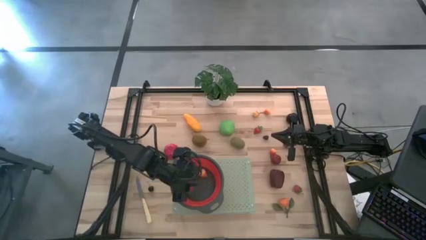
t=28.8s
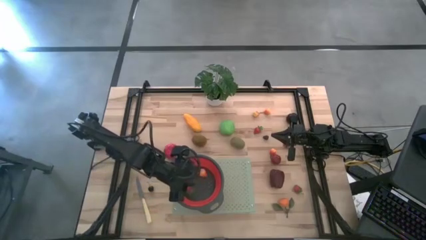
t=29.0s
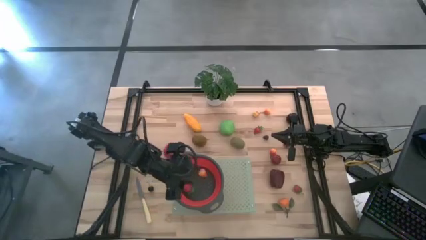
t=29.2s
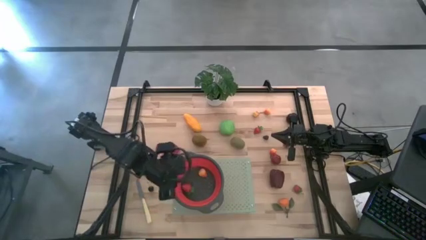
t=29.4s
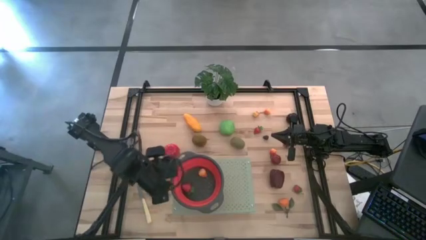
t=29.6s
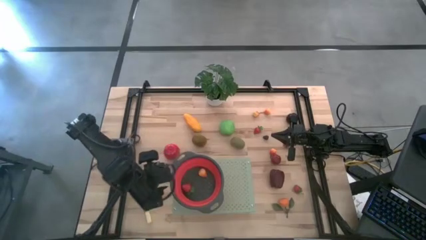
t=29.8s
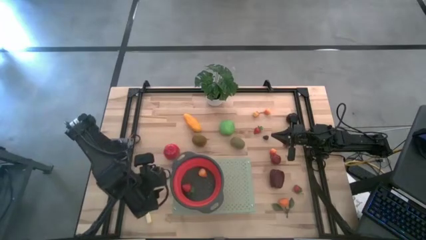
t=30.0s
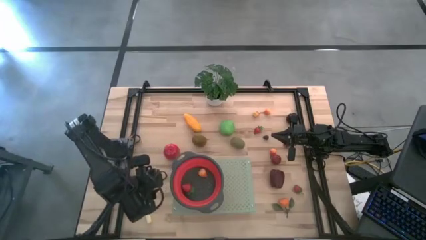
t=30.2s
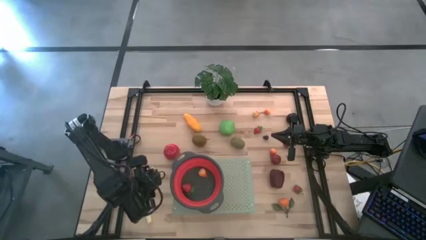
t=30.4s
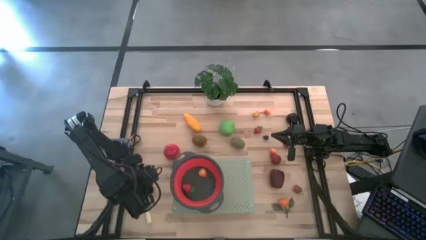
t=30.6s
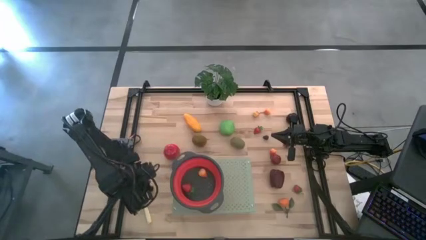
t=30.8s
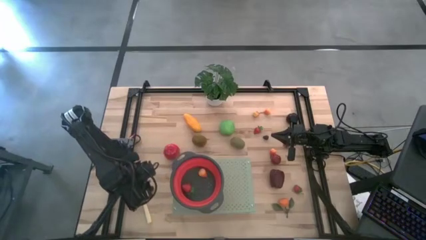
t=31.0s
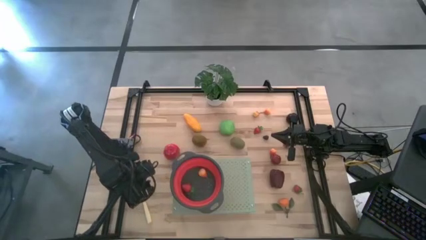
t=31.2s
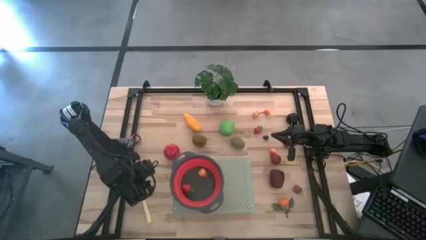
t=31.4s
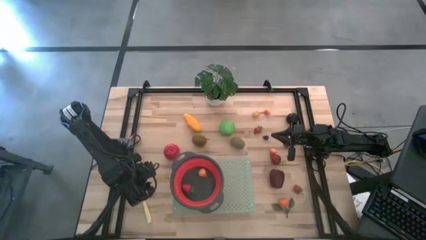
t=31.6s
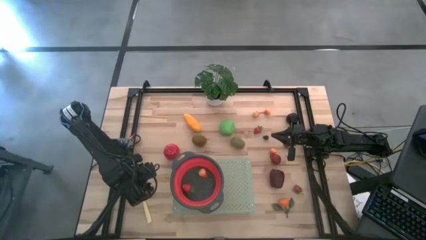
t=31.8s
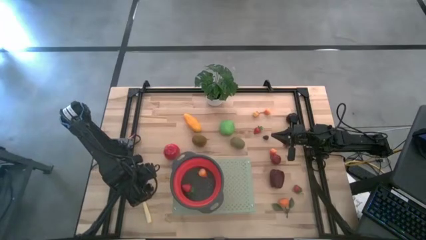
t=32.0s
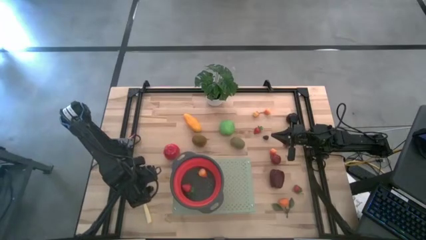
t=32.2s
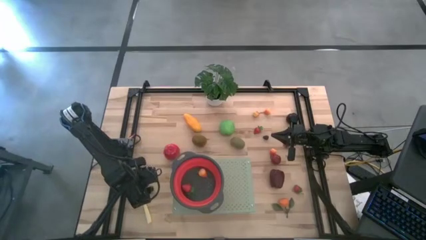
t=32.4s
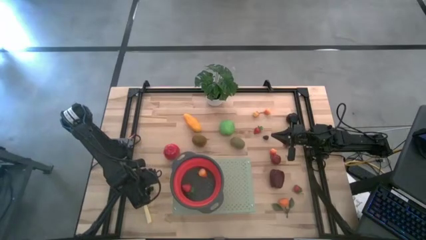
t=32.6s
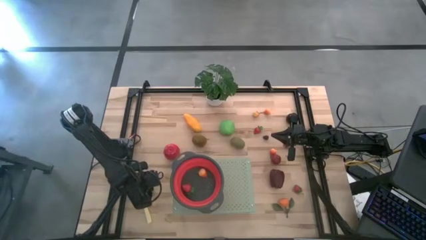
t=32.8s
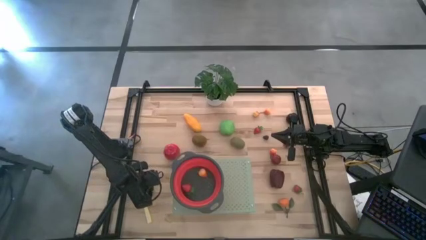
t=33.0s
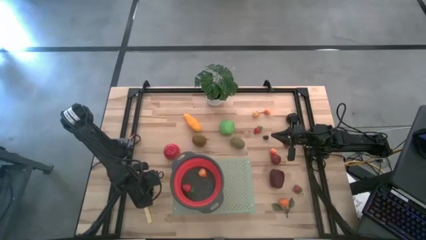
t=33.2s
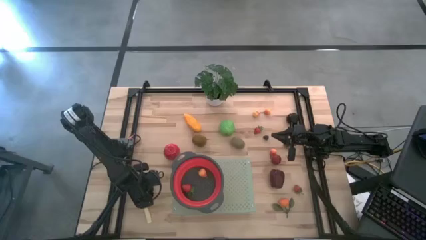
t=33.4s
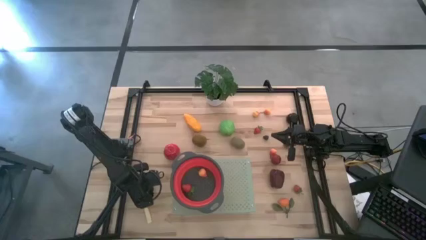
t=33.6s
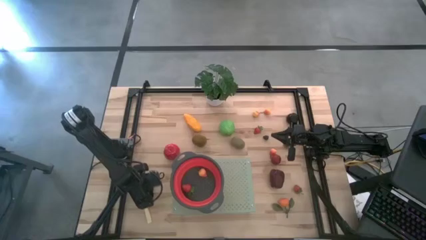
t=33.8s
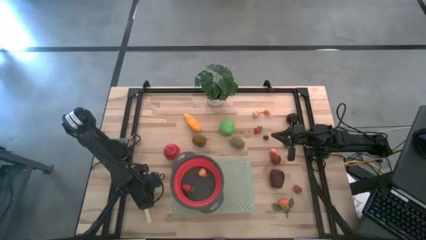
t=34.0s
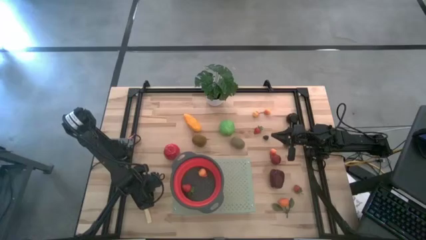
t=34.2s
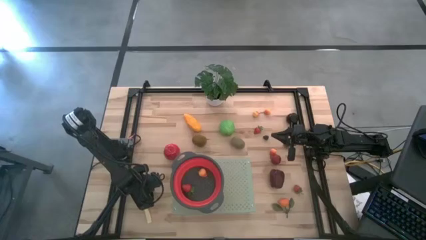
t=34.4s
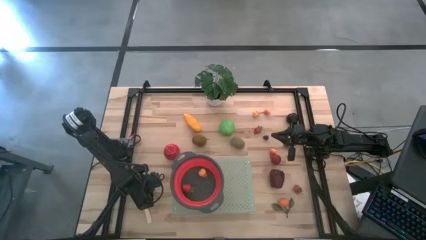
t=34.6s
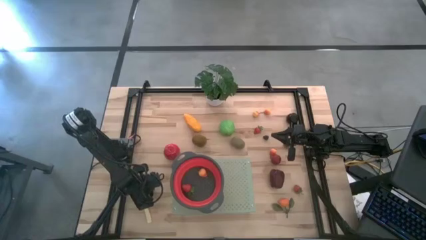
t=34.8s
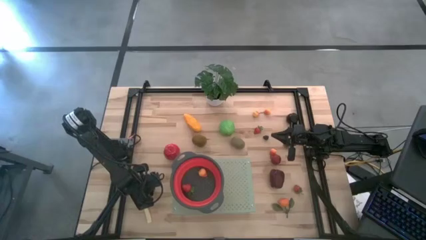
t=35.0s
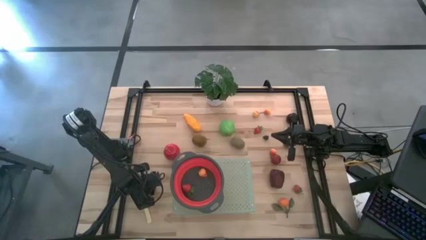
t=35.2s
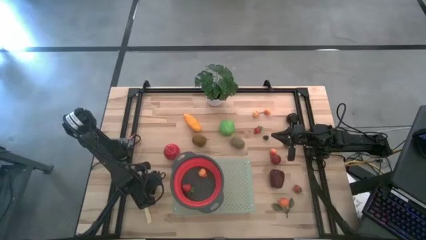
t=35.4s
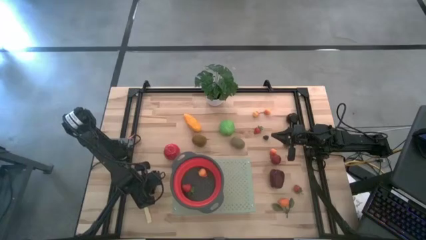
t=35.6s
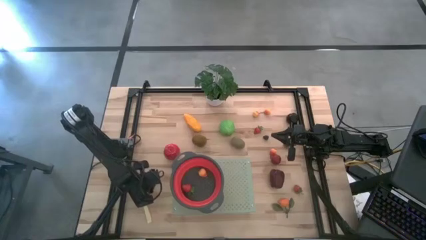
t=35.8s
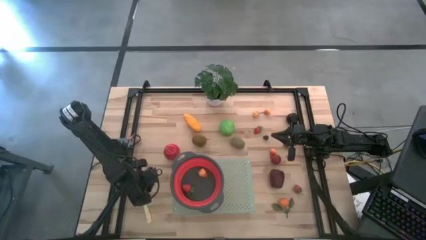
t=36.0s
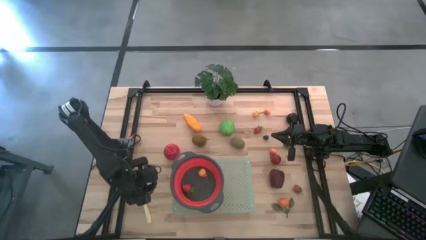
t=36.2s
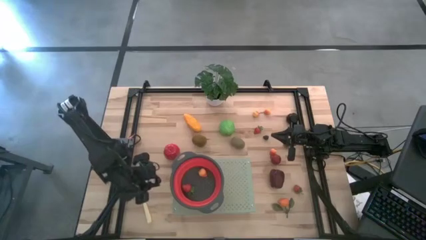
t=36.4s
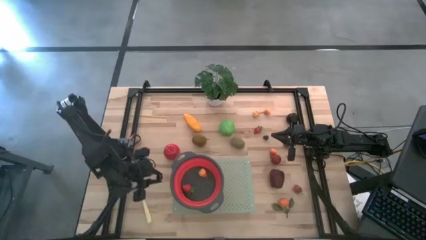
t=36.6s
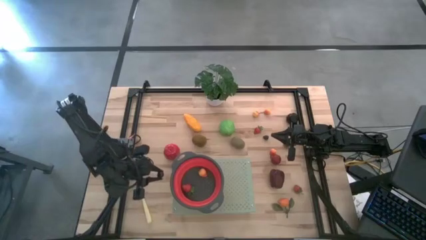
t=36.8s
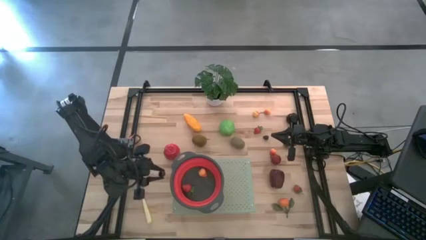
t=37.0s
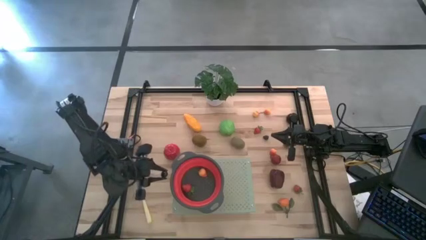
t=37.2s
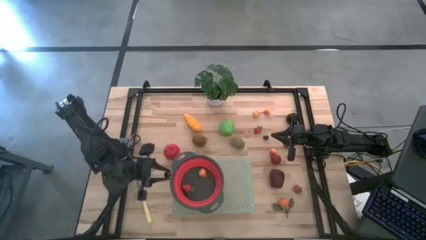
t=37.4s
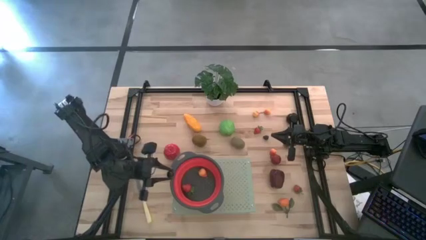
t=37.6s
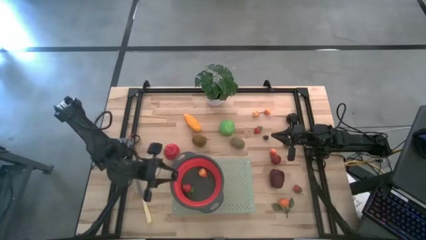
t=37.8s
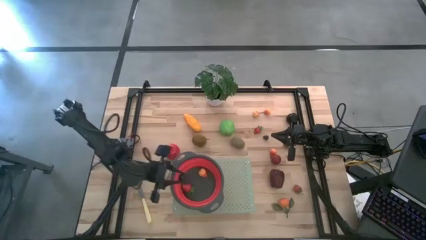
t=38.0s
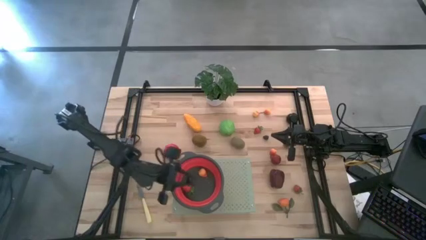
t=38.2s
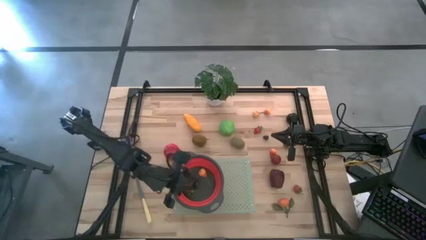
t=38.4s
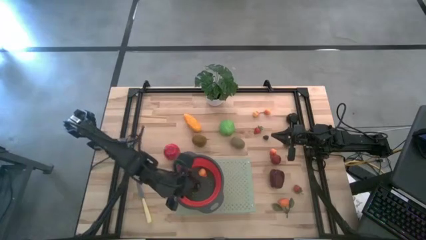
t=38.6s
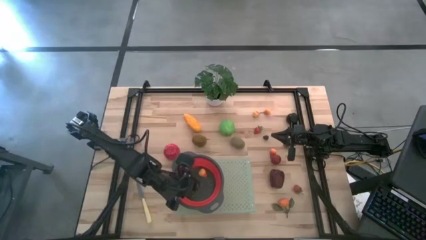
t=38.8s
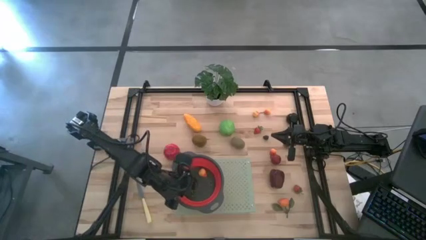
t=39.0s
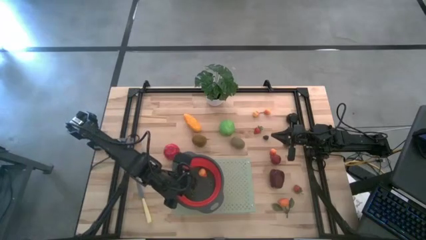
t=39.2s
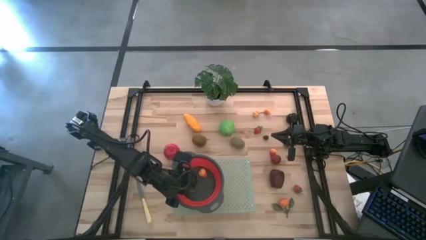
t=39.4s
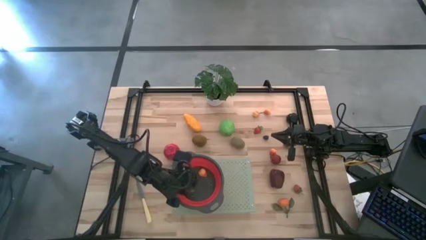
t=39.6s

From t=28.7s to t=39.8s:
Task: Pick & Place Fruit
Put the cherry into the red strainer

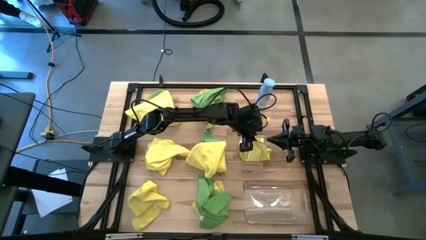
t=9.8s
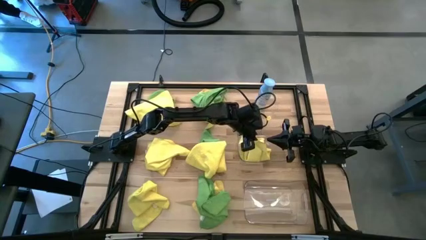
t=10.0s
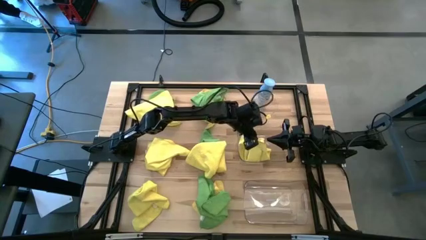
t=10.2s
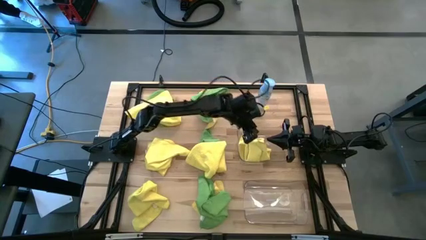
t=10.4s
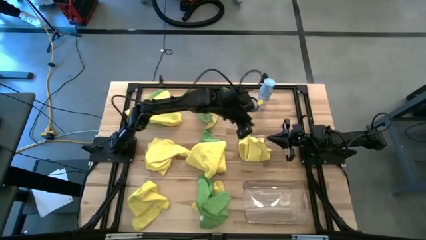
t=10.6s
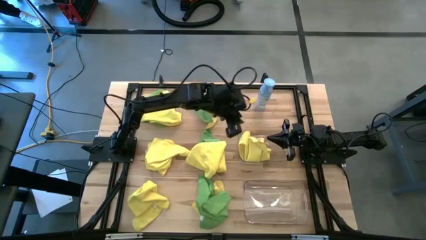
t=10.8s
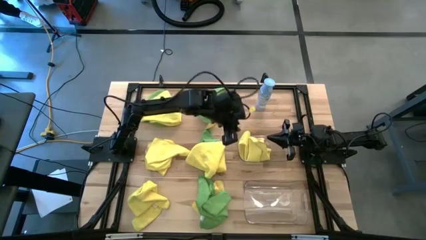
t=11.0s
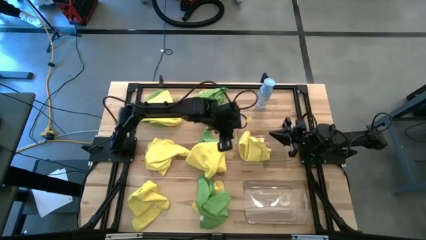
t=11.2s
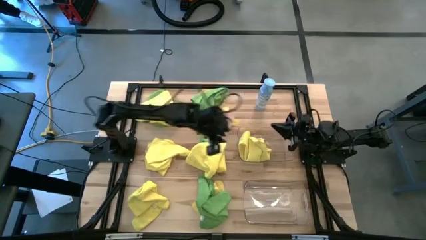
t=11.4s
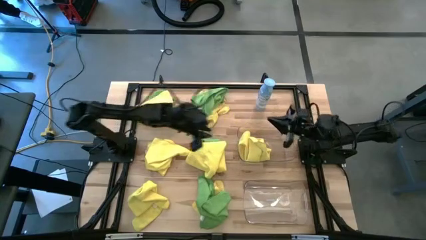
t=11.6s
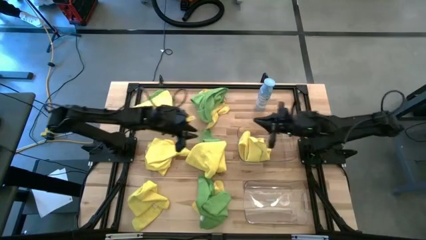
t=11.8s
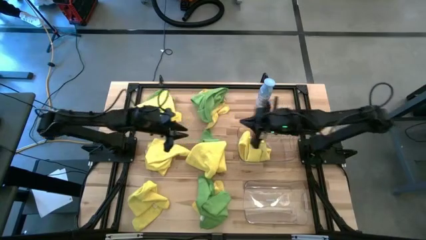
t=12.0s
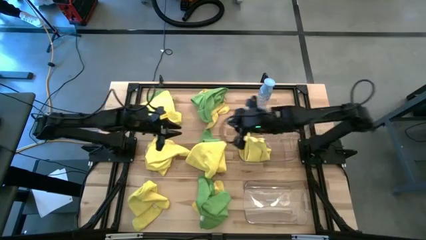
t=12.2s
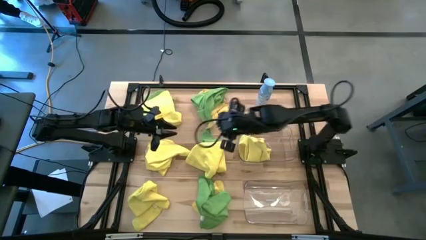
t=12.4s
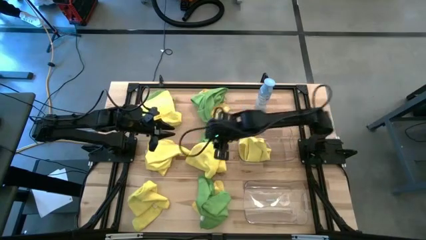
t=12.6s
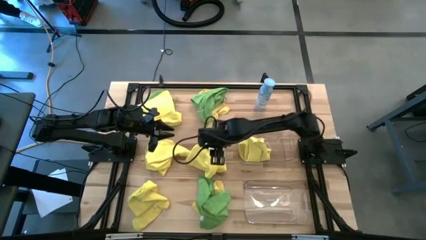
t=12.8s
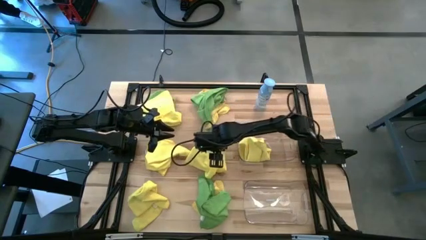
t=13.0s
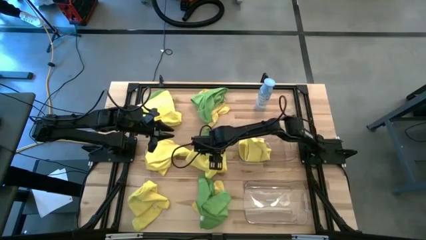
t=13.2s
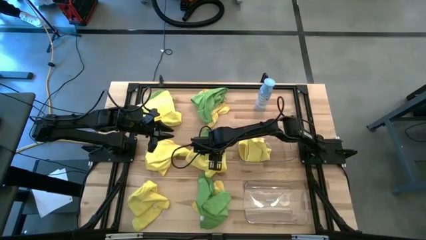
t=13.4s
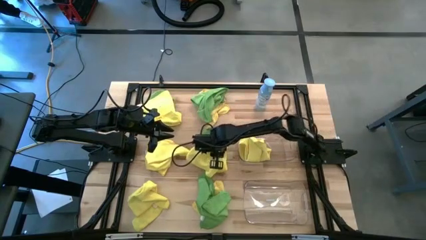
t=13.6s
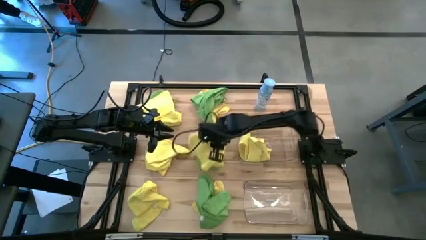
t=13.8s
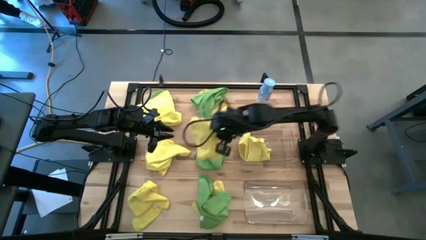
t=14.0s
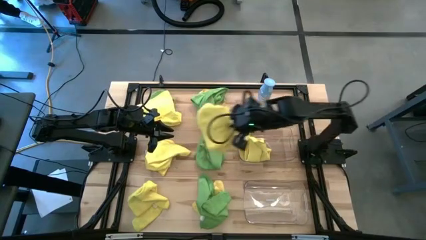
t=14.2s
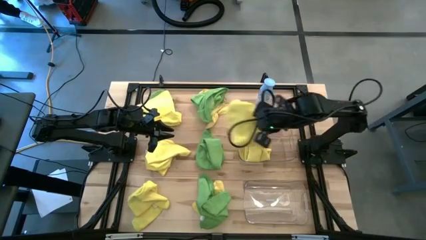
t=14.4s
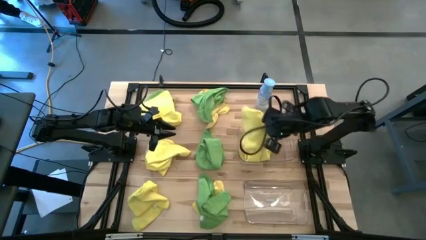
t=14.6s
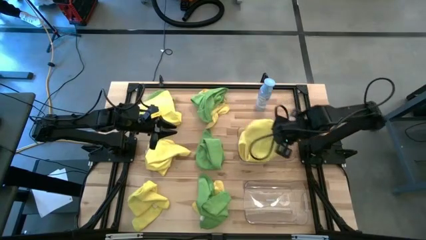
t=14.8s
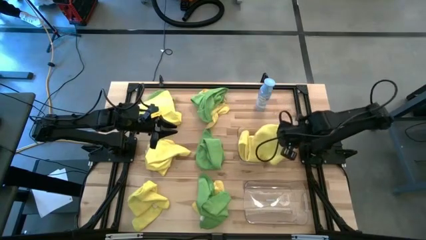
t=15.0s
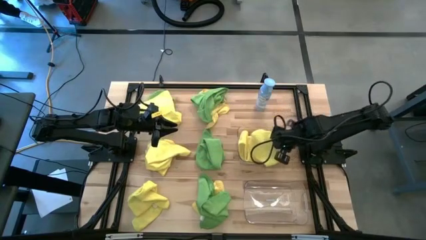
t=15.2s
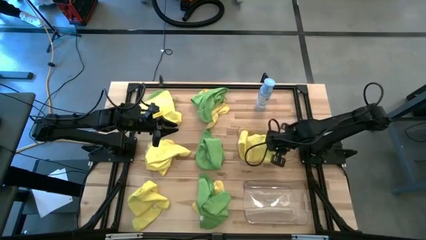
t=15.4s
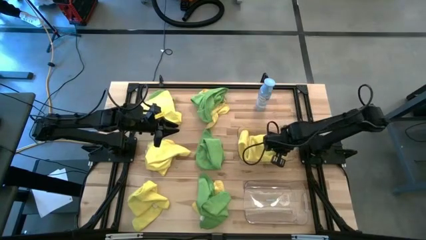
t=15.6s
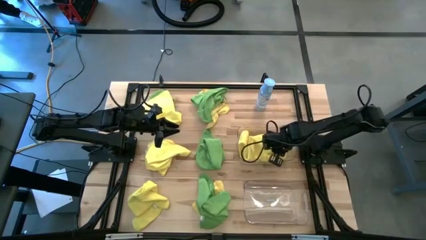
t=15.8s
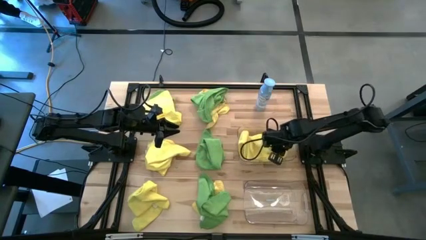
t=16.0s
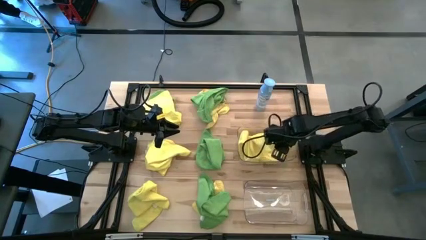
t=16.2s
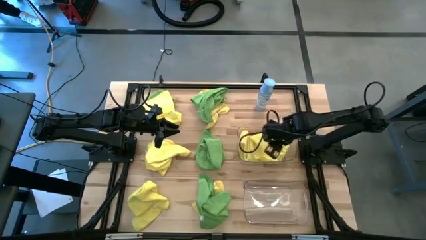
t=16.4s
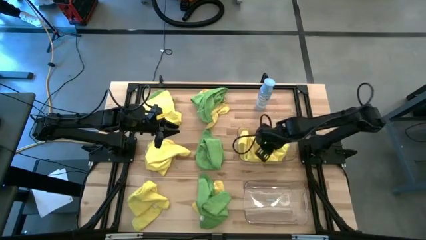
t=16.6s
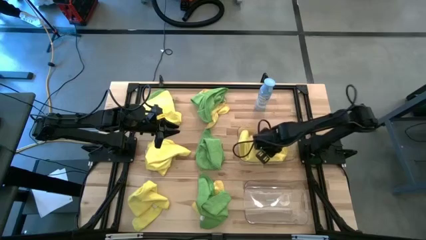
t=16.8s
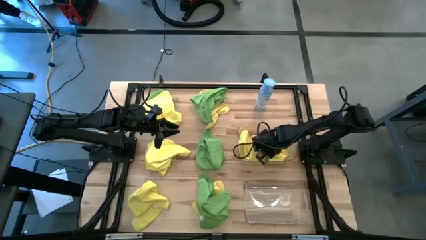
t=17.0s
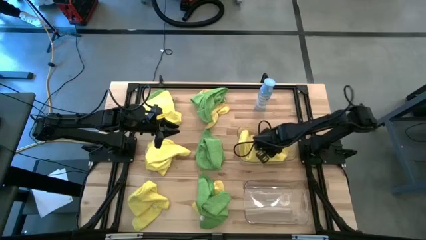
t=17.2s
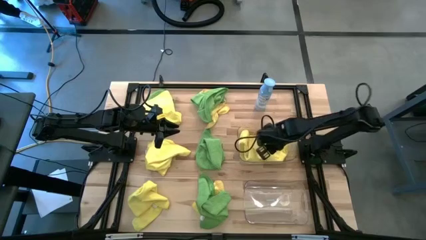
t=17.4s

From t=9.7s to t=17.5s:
Task: Sort microfiber towel by color & place in baskets
Put the yellow microfiber towel into the top transparent bin
